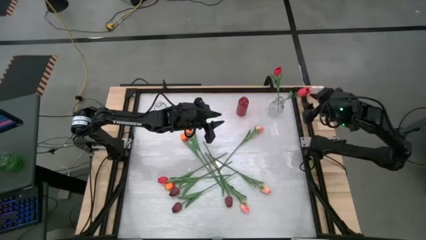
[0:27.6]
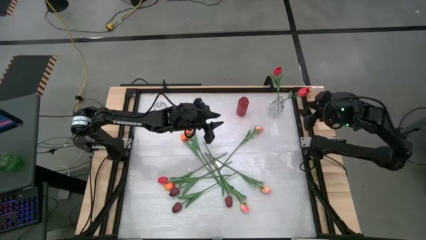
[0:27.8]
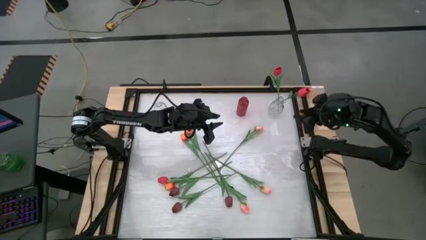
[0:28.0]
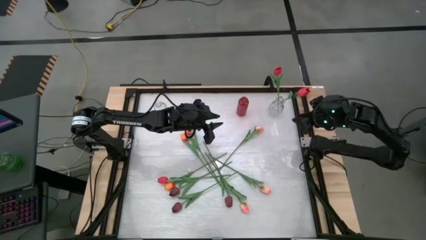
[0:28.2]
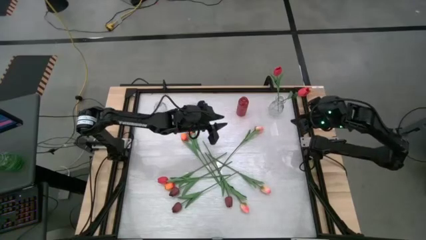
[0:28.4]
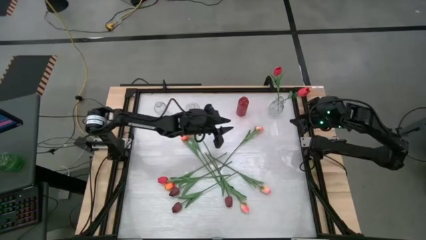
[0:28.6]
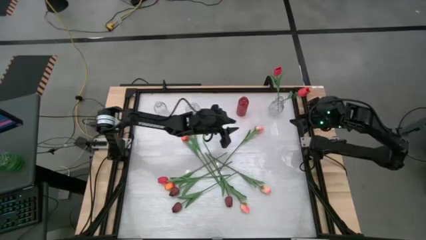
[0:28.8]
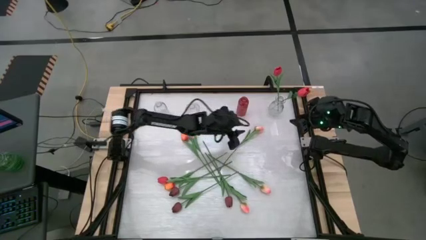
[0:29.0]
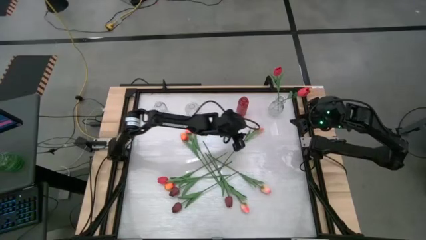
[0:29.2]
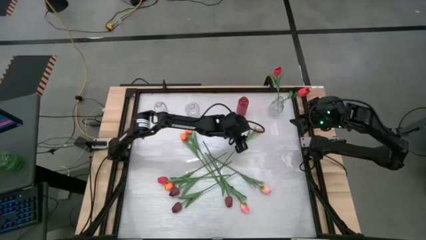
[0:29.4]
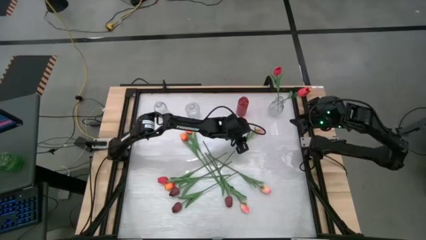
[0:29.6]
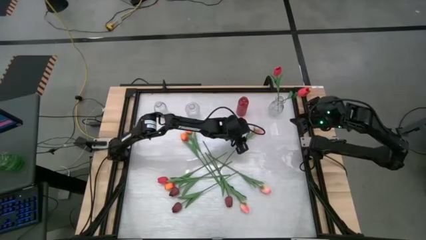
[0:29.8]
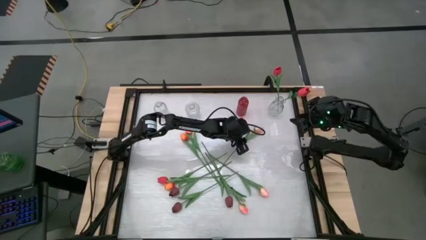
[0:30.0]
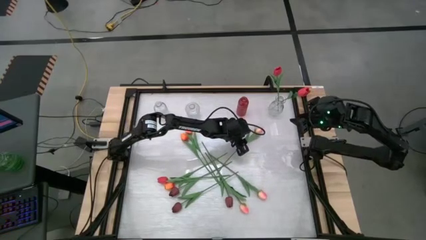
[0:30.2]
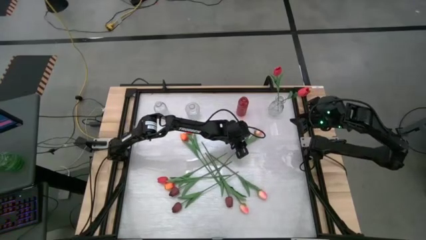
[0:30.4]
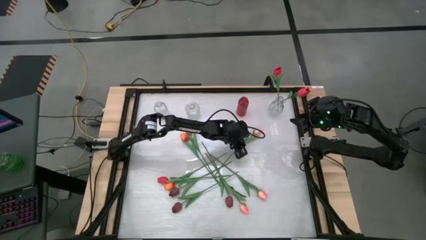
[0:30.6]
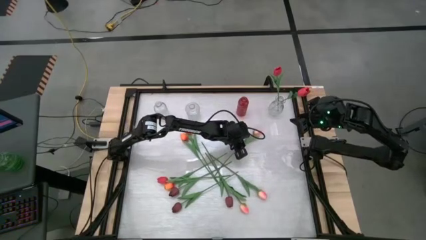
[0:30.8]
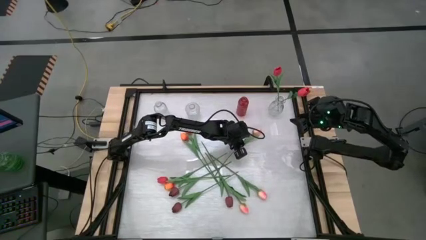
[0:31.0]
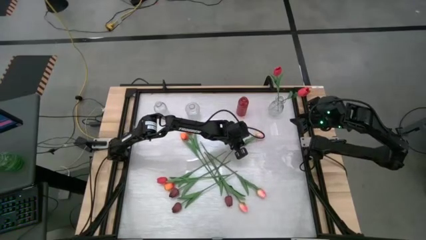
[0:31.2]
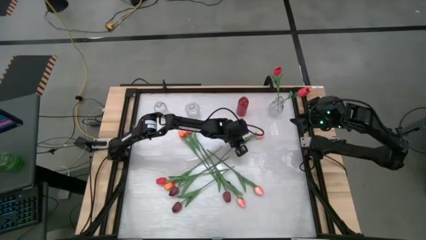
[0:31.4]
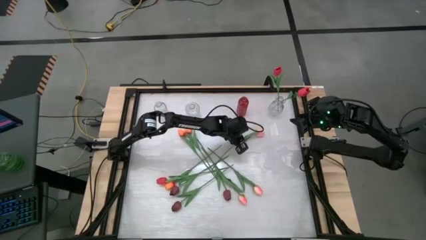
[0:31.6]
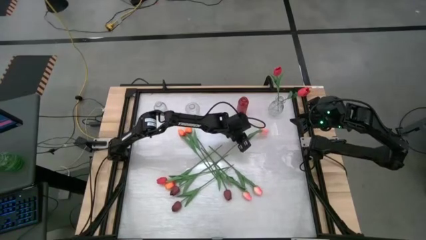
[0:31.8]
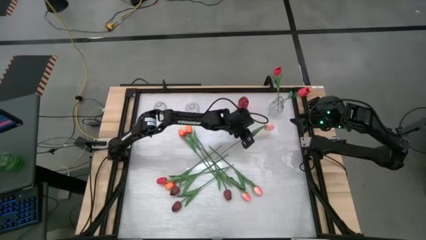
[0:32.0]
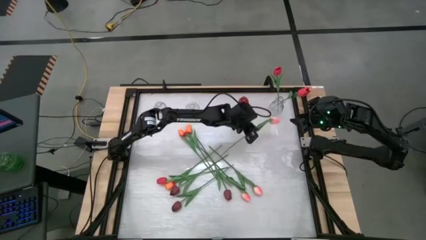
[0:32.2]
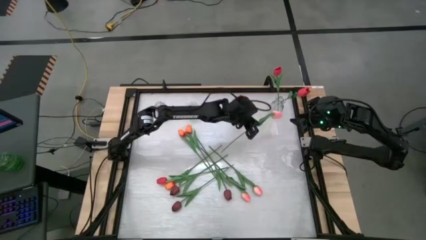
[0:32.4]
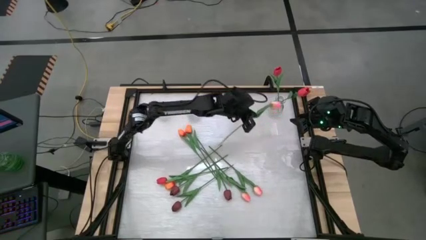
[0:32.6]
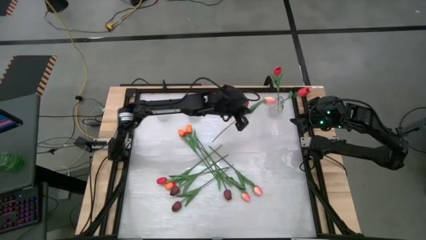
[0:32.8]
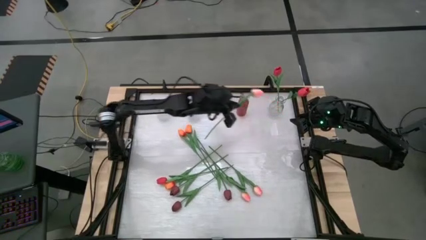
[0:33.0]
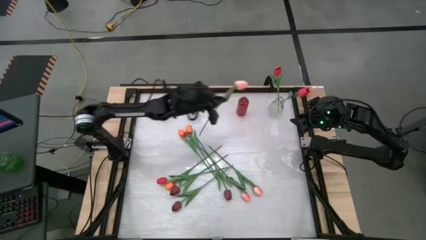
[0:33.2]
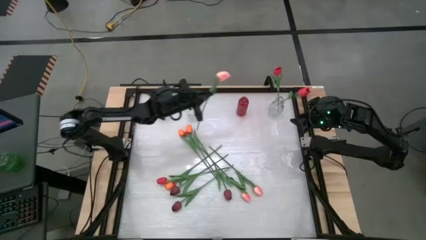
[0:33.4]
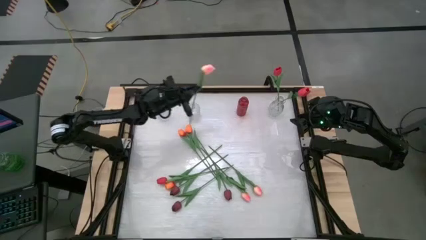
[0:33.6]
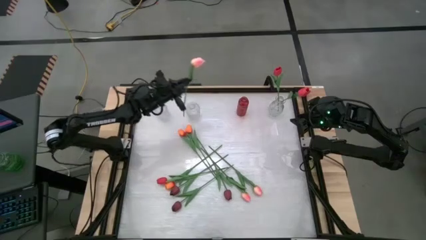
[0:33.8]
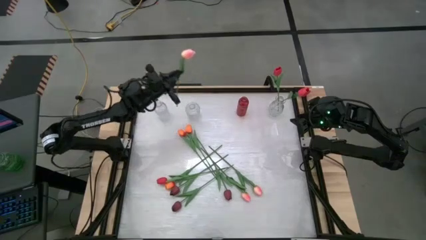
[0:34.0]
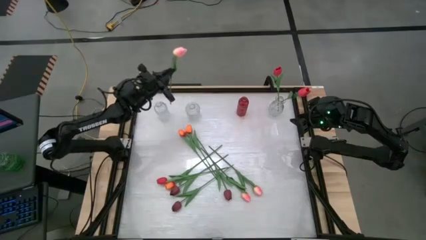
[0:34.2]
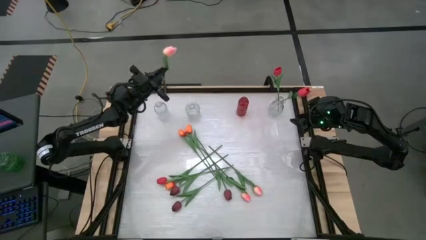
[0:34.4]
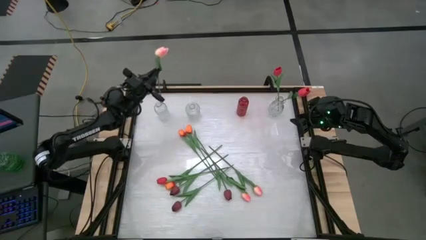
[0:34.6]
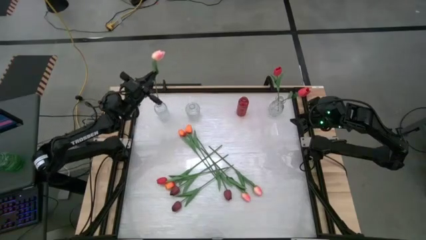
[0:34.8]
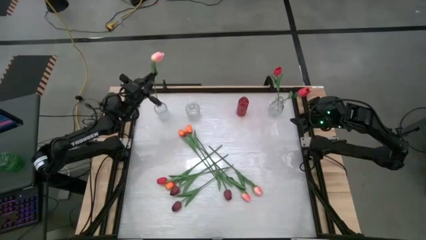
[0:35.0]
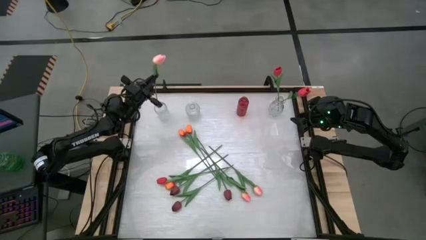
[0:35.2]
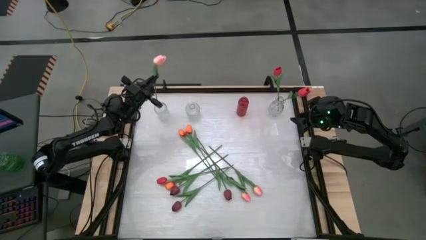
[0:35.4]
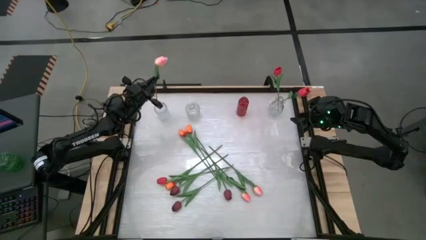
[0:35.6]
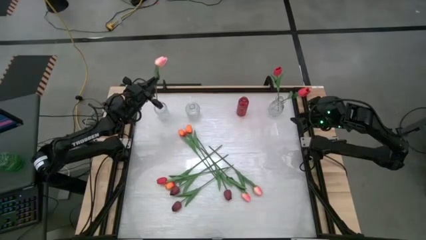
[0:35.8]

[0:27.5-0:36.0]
Task: Sort flowers into vase by color
Put the white-pink flower into the left transparent vase

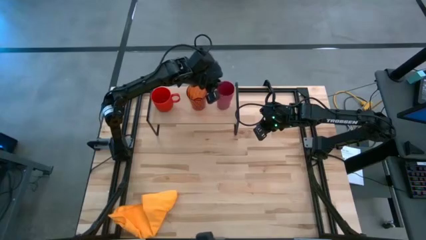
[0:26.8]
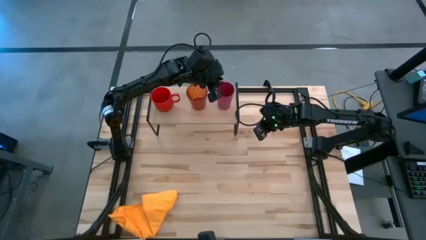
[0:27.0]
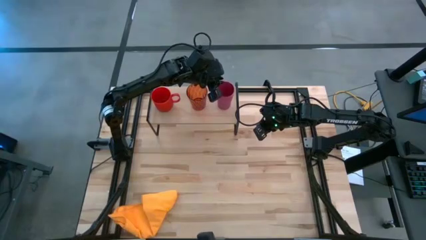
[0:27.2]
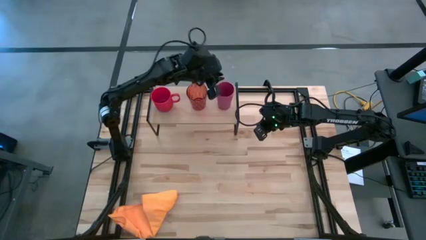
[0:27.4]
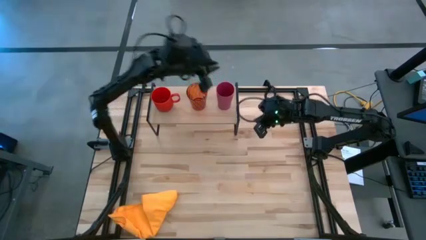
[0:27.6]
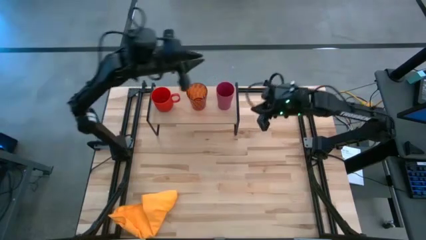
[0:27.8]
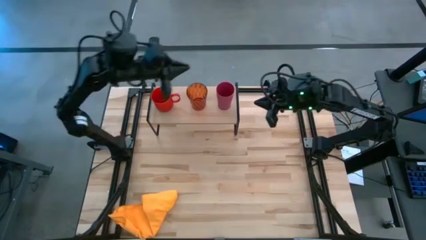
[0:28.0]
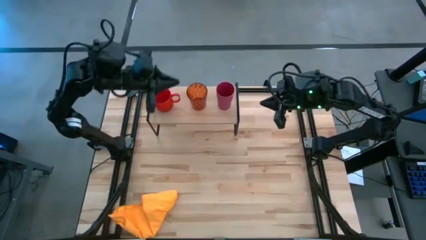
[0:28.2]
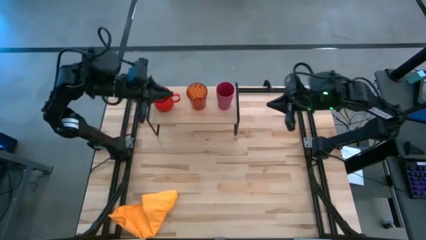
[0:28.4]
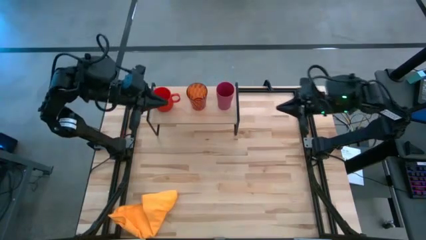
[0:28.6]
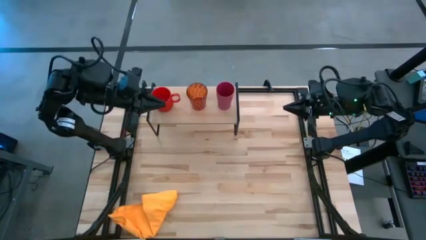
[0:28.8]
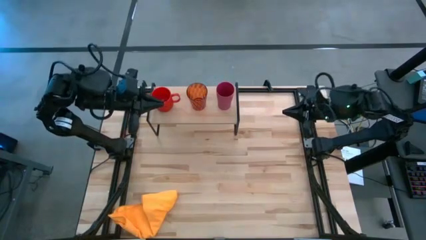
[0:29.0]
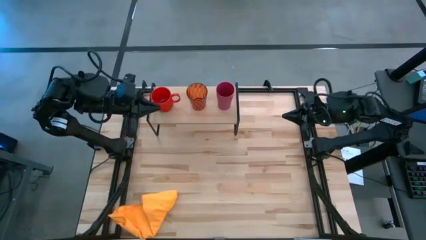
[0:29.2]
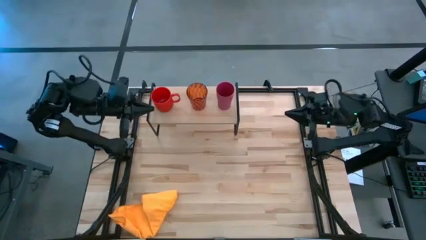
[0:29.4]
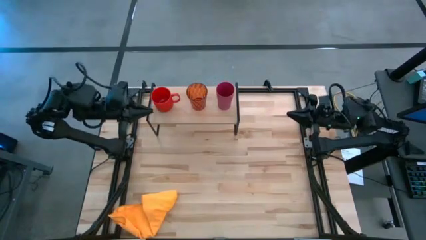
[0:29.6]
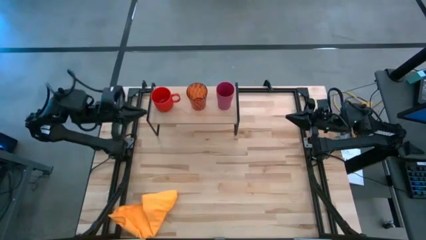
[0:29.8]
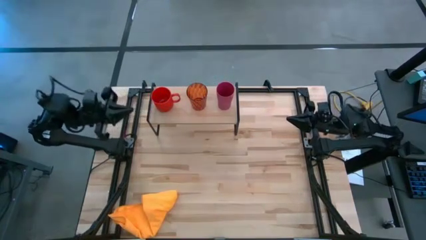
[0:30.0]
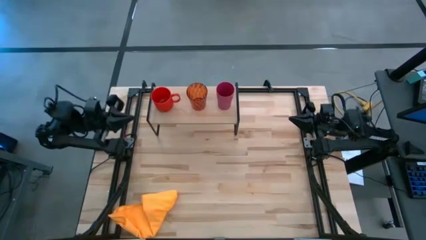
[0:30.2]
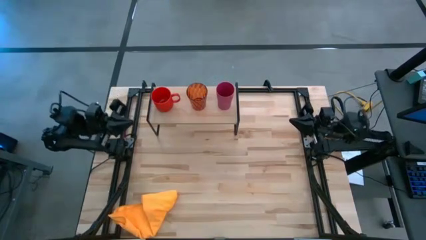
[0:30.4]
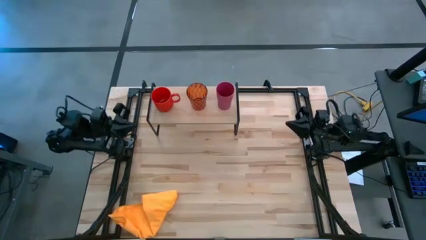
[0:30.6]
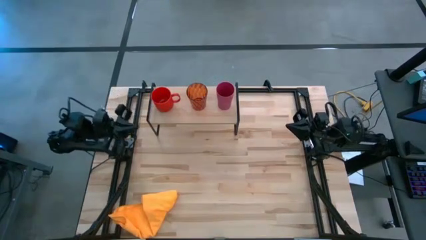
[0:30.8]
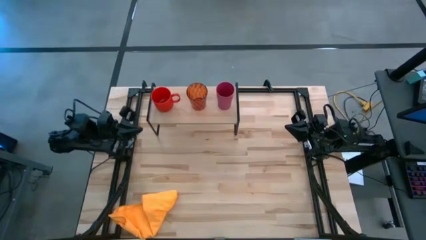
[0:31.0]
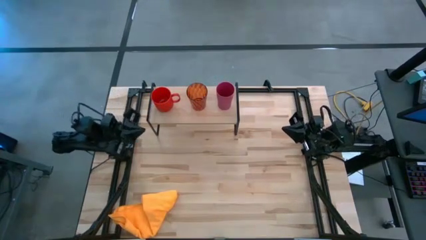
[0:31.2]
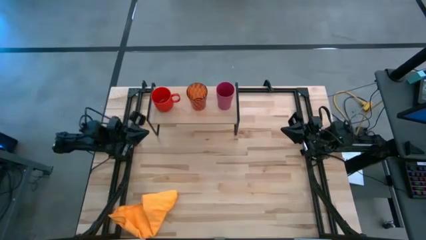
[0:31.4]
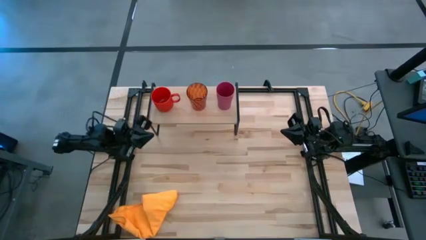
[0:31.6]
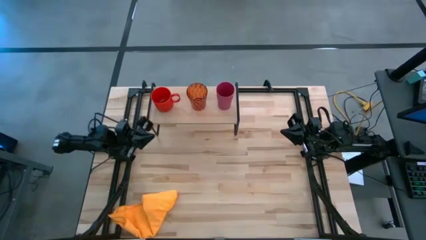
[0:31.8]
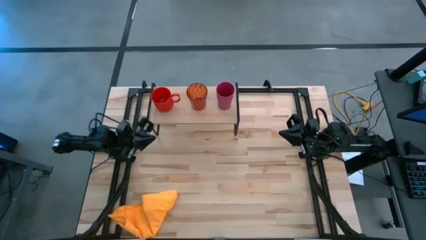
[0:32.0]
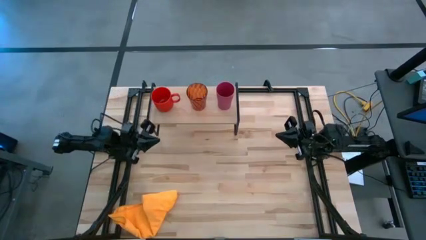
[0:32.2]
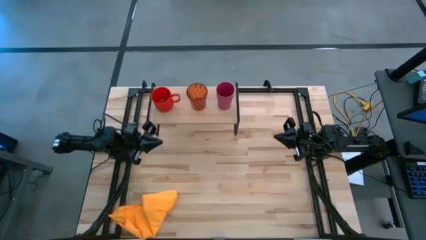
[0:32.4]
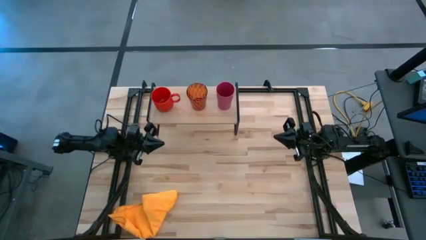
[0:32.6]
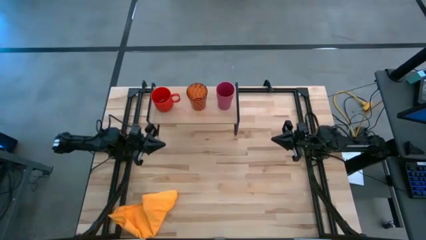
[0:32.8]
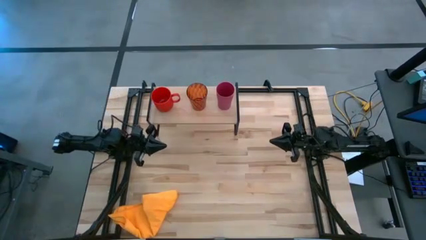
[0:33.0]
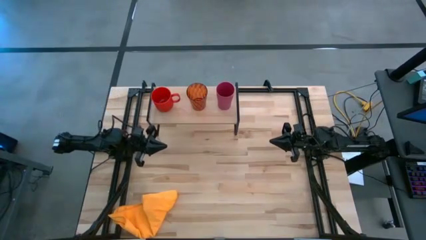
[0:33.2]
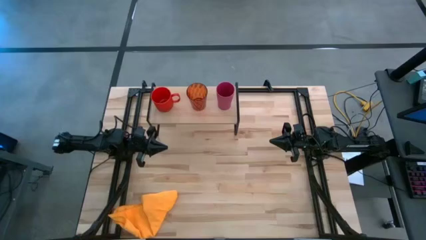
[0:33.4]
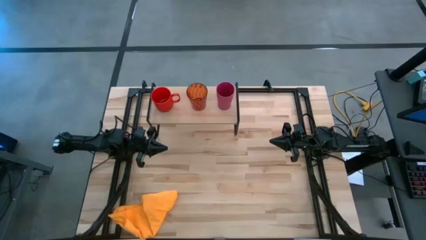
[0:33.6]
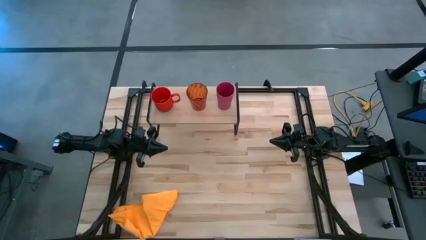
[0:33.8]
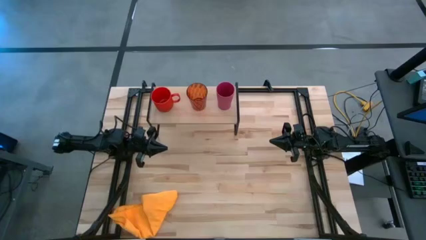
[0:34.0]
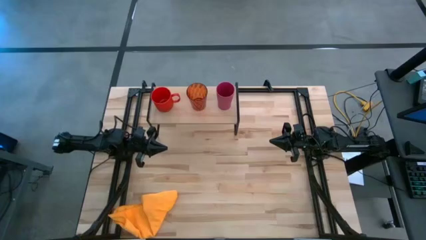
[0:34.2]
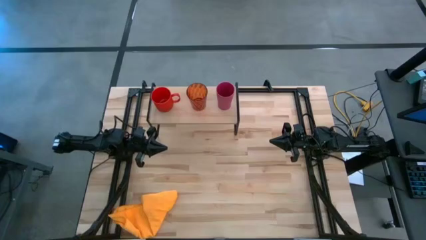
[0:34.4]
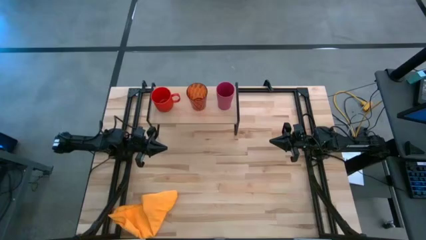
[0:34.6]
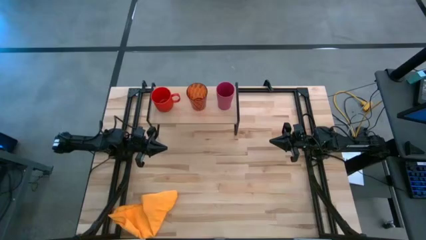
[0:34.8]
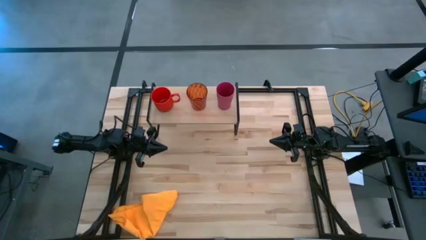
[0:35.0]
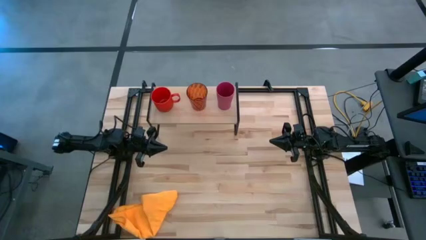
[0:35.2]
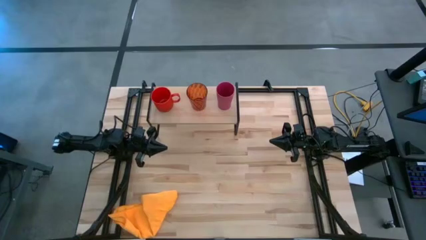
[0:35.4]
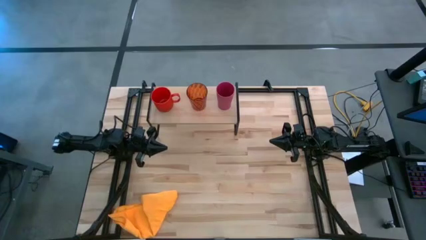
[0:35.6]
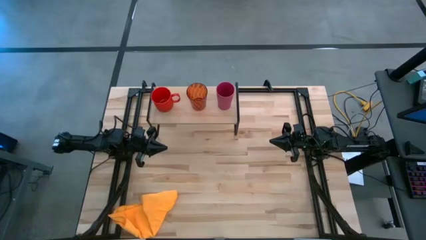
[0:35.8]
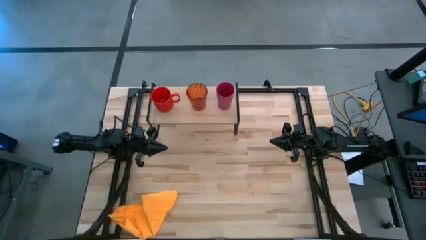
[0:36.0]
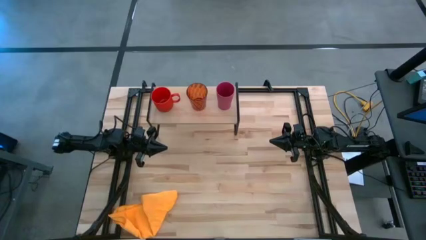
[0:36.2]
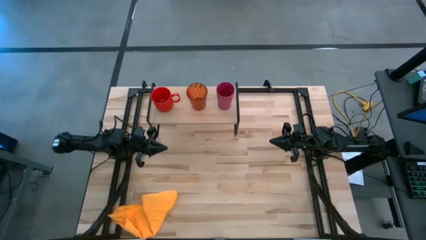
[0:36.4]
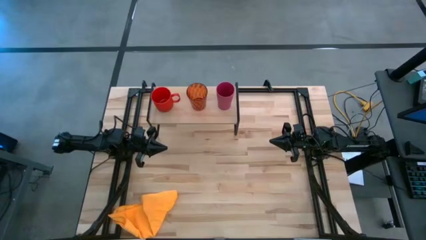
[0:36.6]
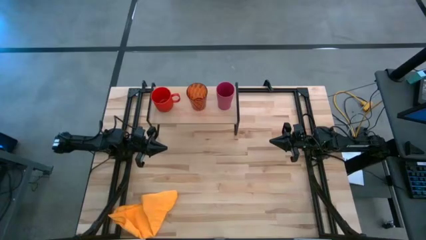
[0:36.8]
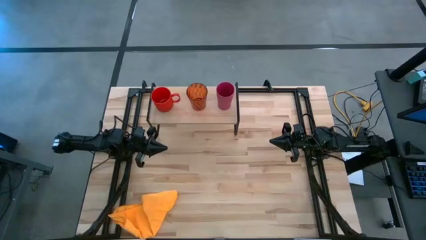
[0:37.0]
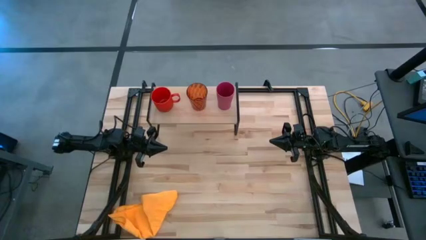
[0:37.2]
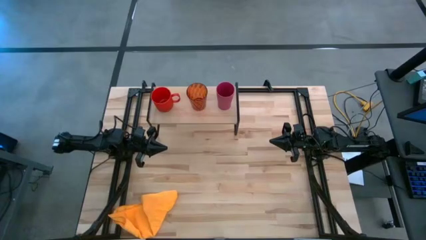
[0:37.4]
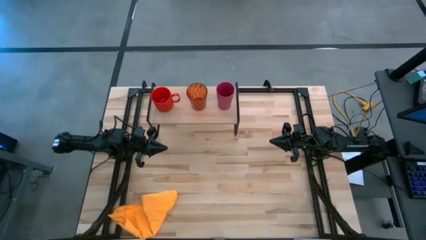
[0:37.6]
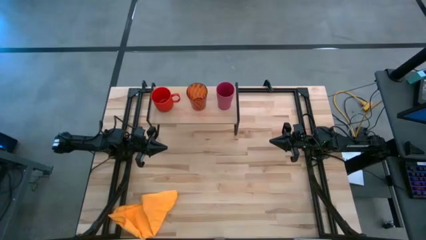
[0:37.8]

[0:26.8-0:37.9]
Task: Stack small to large cups/mugs on shelf
Return to Home Position
